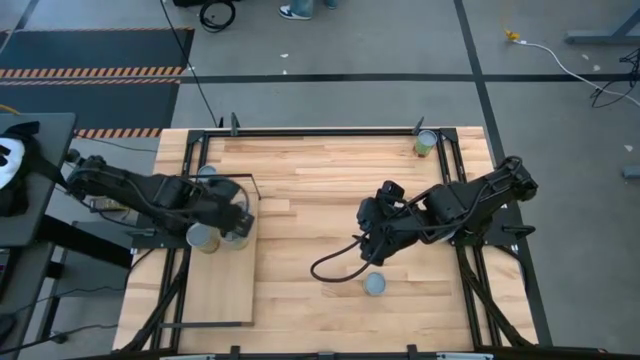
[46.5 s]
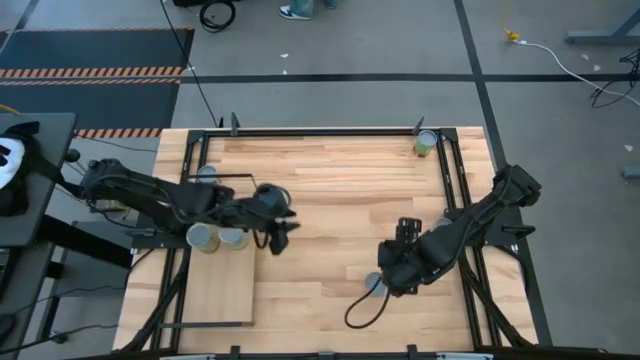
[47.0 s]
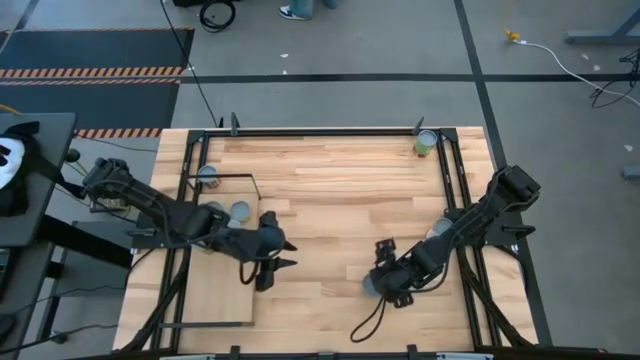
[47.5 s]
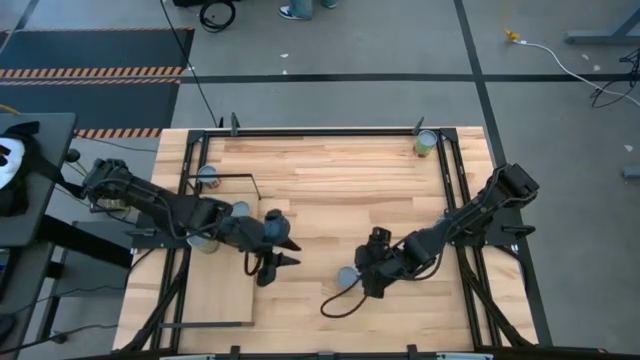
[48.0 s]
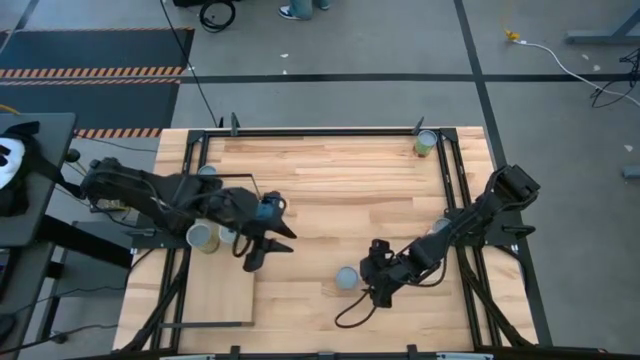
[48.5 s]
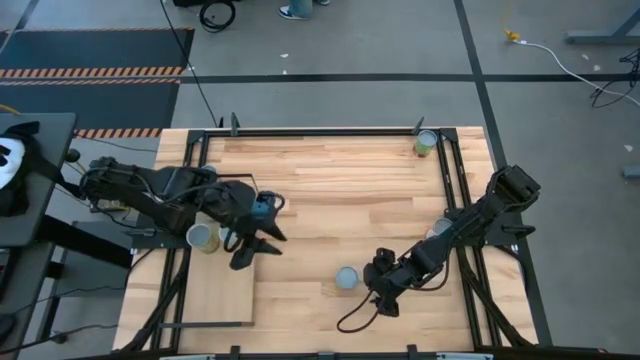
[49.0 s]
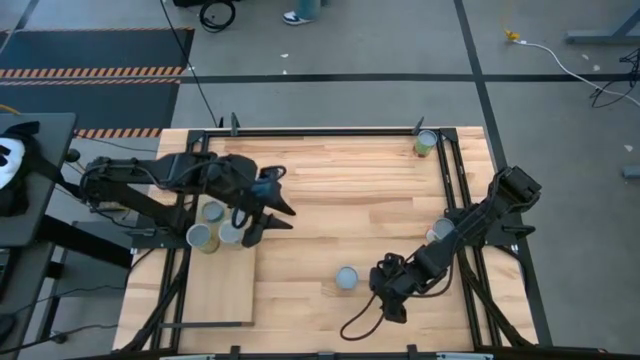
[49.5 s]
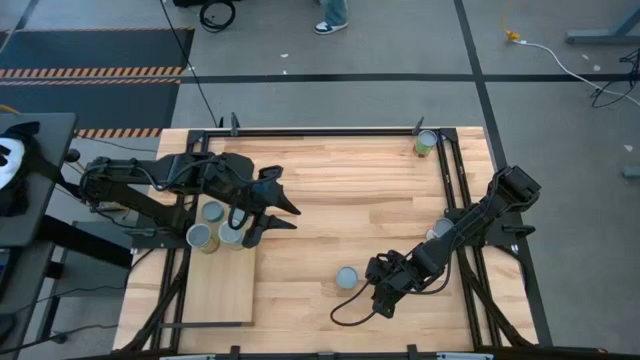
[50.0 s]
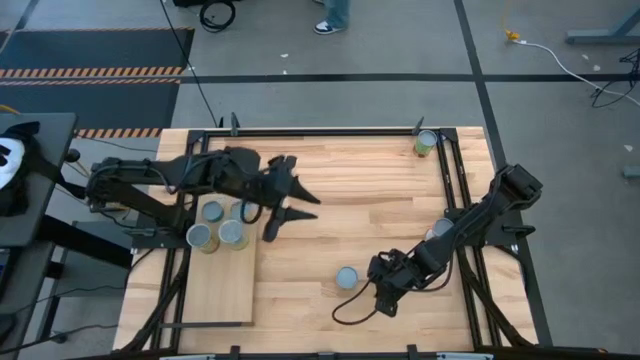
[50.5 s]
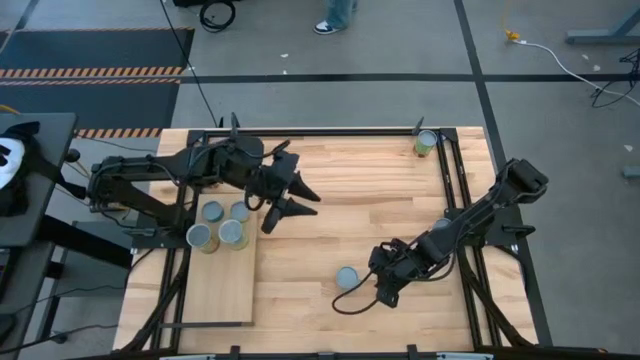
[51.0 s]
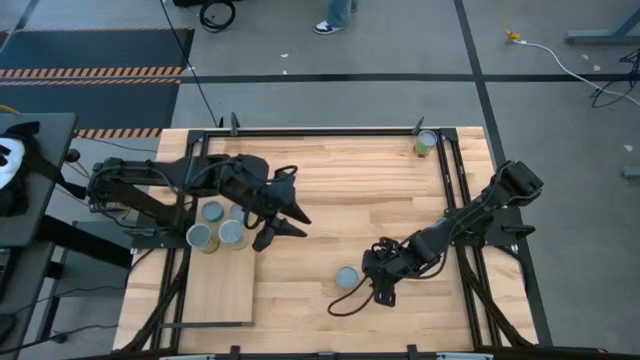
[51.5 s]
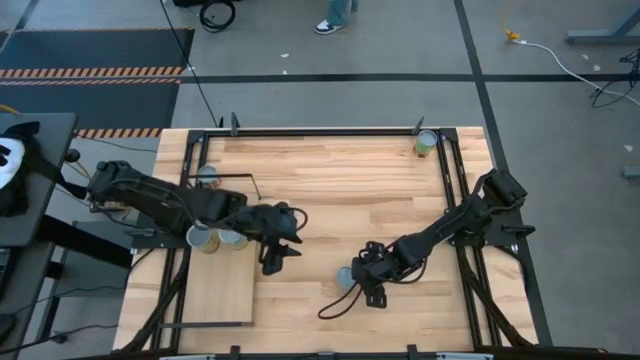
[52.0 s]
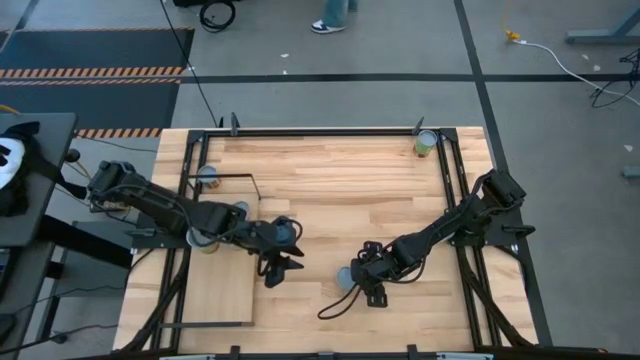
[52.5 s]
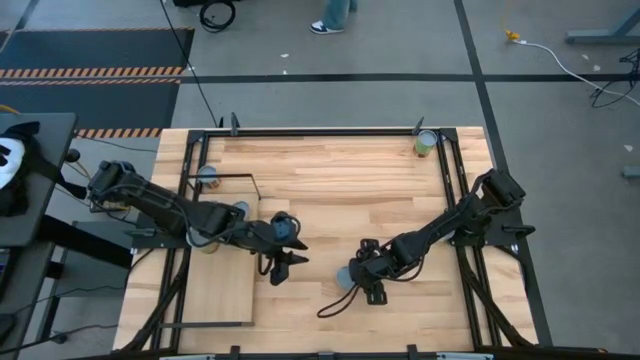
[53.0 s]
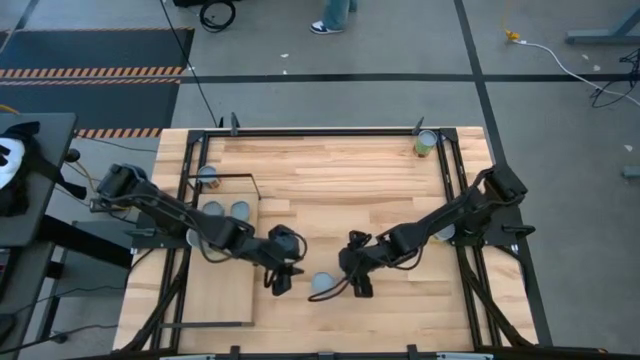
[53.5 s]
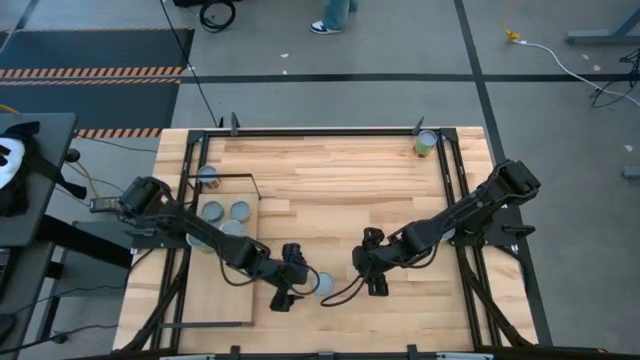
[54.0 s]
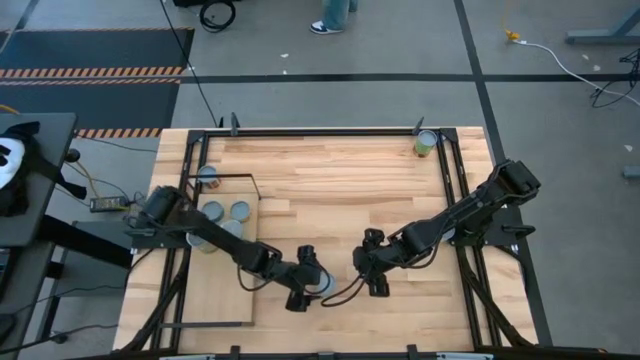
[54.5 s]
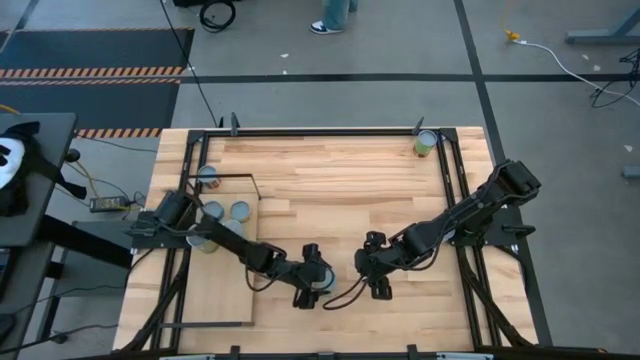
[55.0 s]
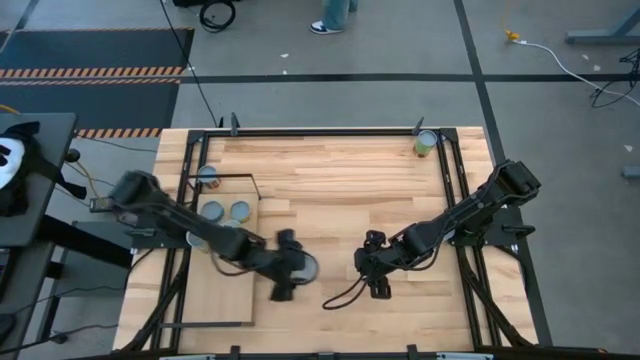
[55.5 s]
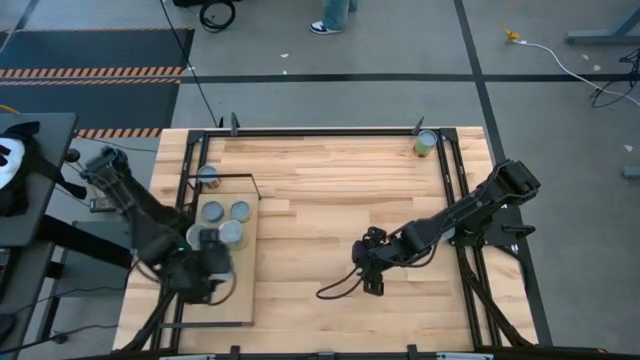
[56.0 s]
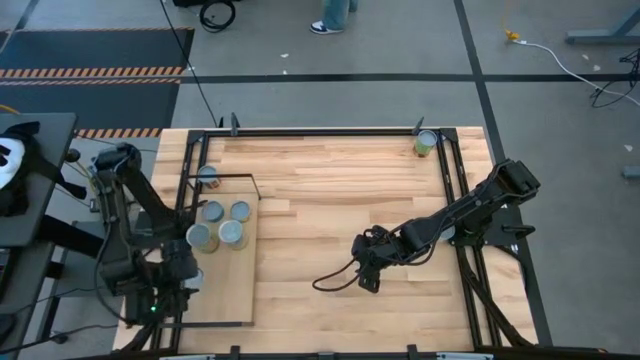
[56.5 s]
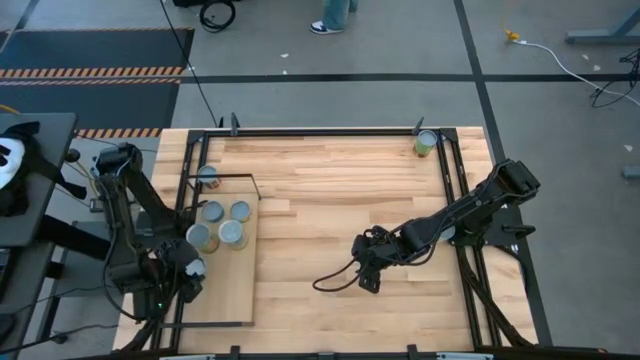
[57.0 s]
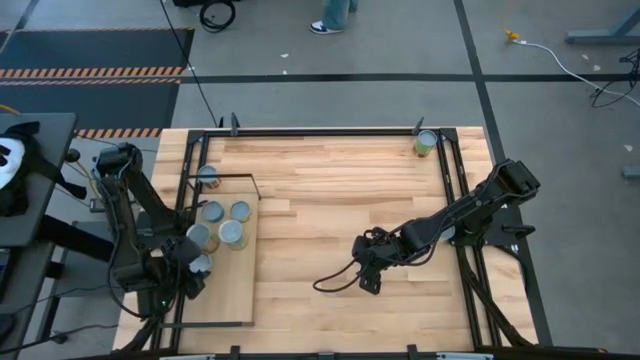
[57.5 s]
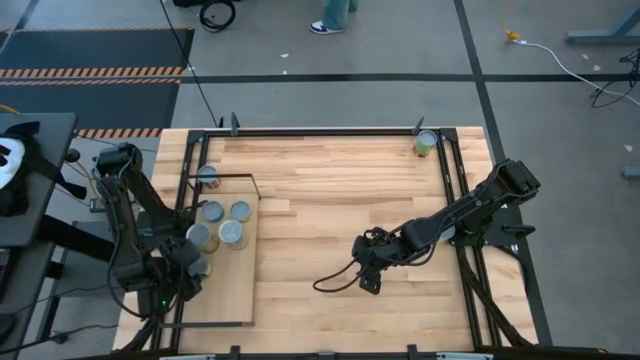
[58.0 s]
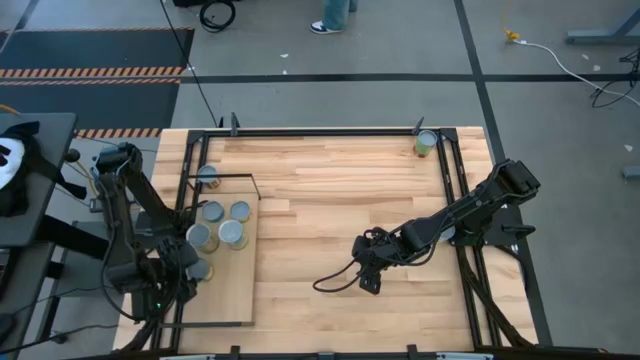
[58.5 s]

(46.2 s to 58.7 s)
Task: Pick and place cans onto a shelf
Put the canned sliced peaches on the shelf

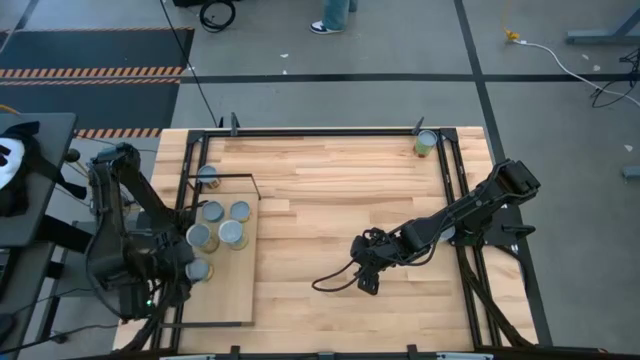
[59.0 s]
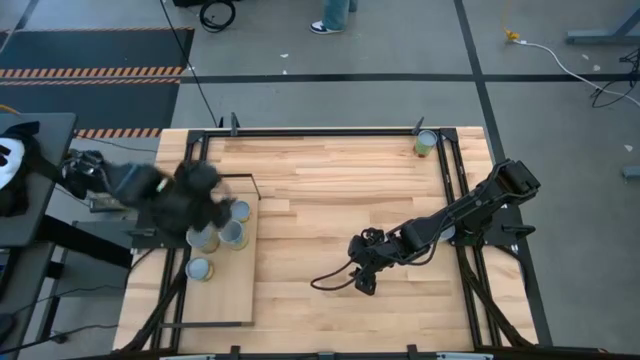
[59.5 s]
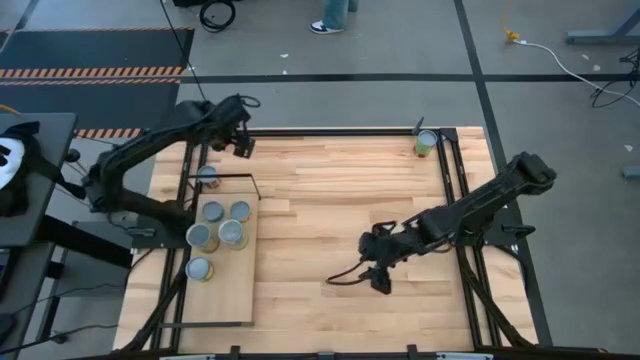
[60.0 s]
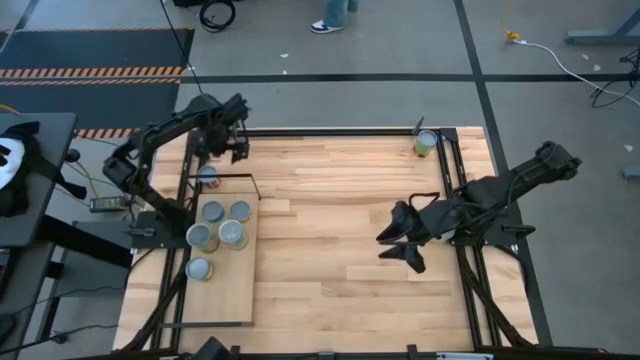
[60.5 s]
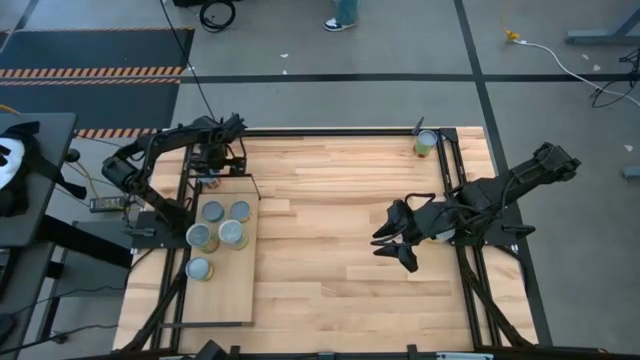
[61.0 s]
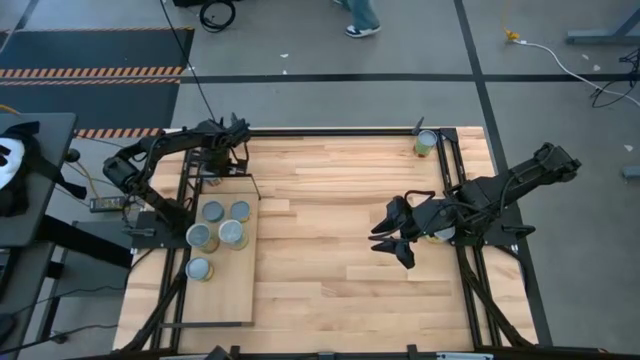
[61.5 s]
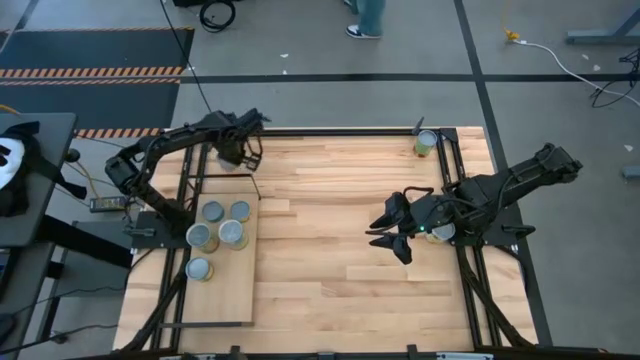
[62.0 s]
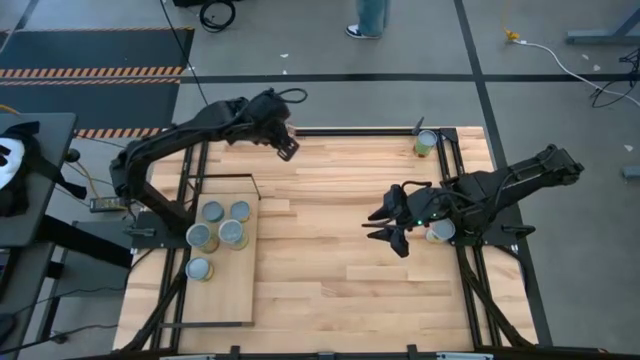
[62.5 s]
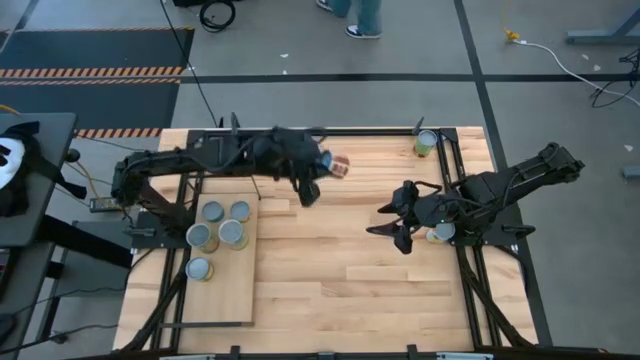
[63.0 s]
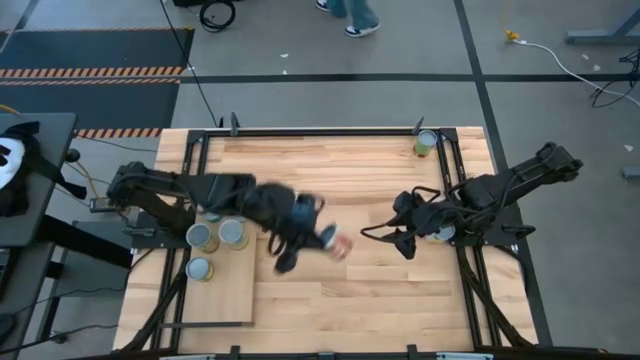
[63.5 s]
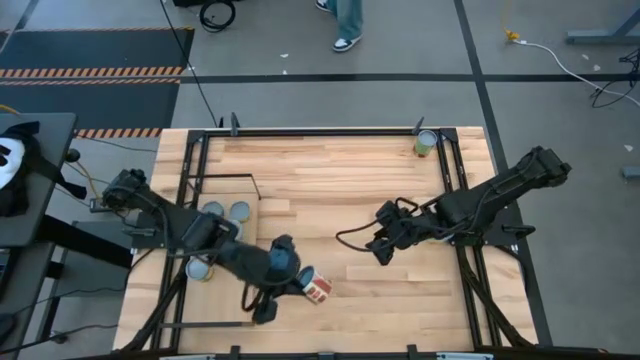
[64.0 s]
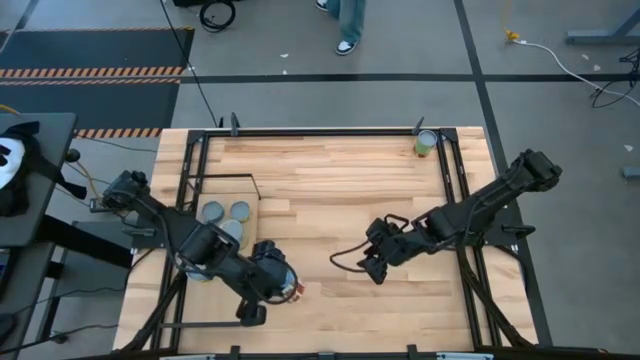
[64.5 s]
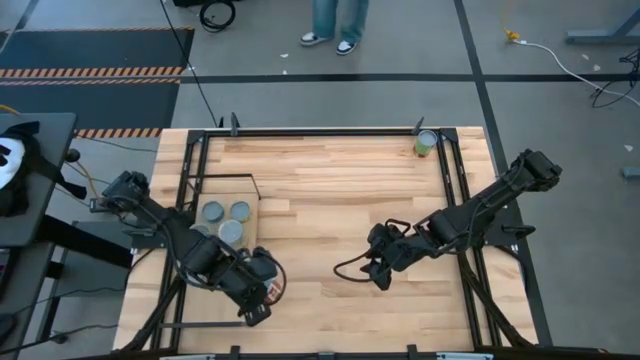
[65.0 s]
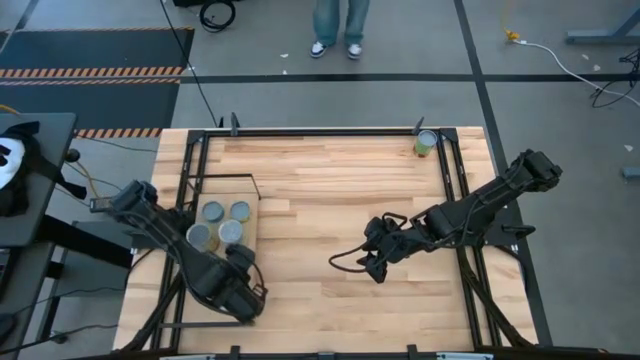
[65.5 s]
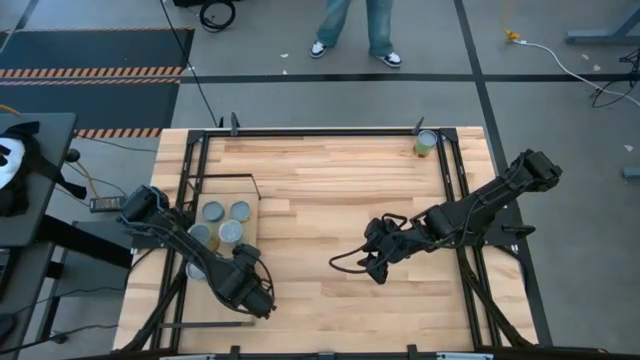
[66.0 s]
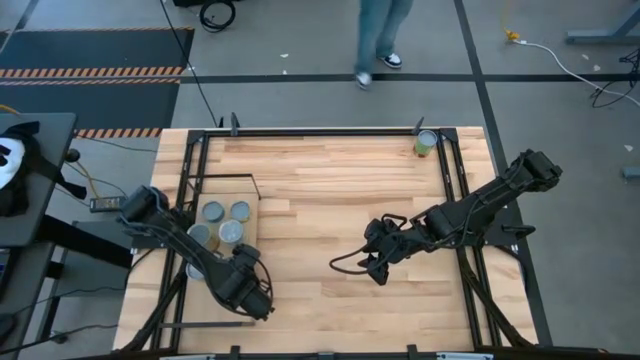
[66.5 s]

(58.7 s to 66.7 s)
Put the canned diced tomatoes on the shelf
